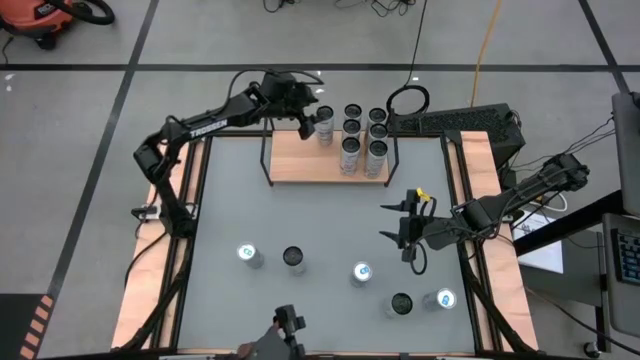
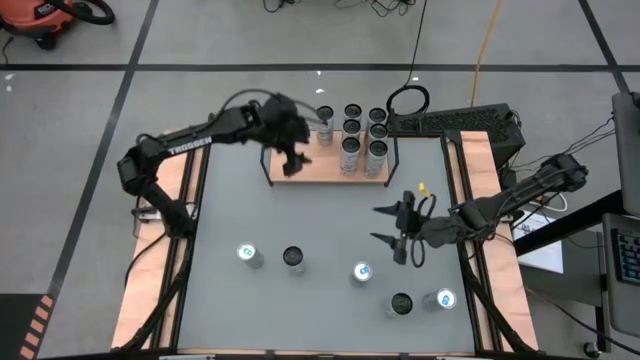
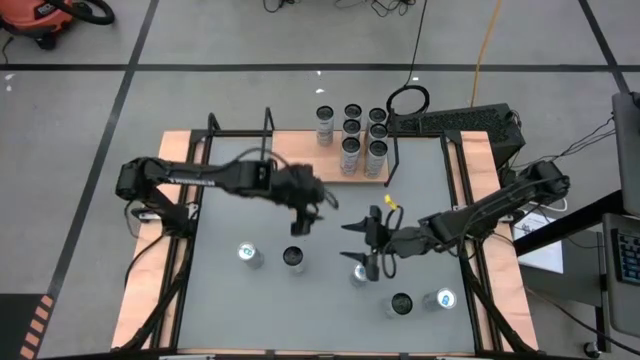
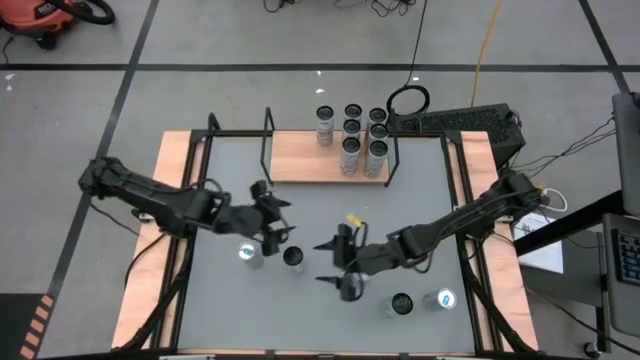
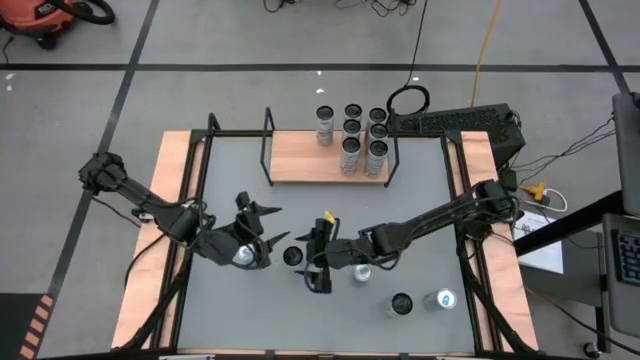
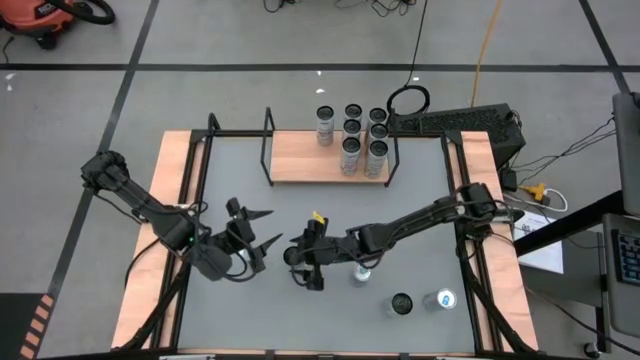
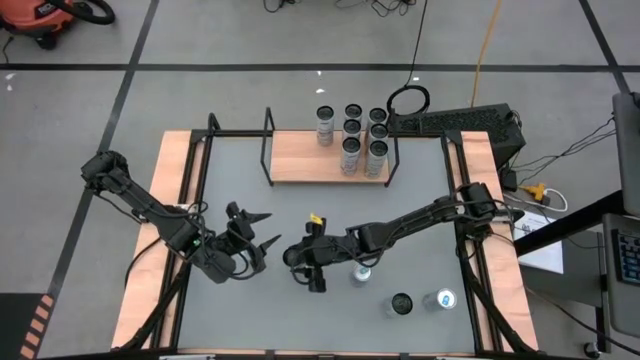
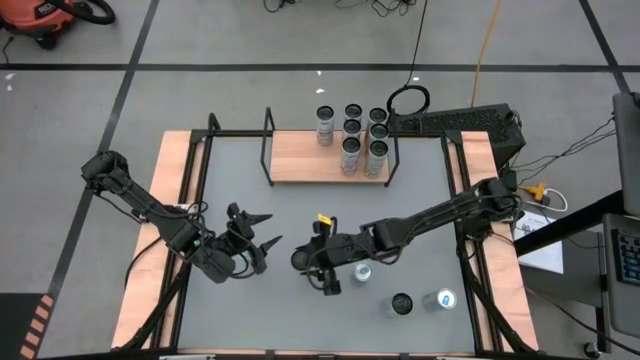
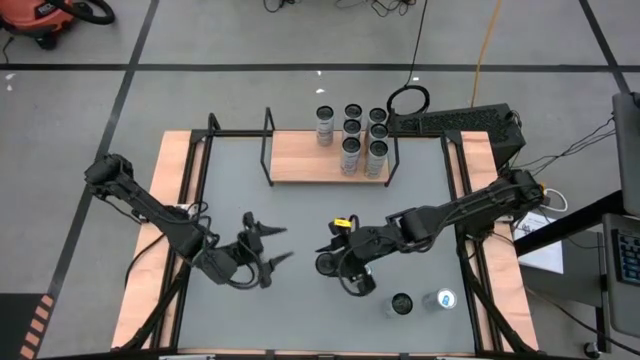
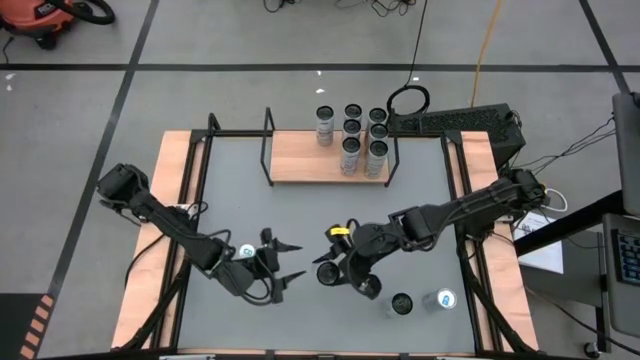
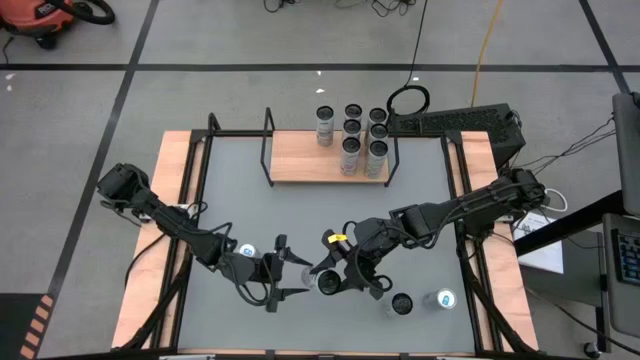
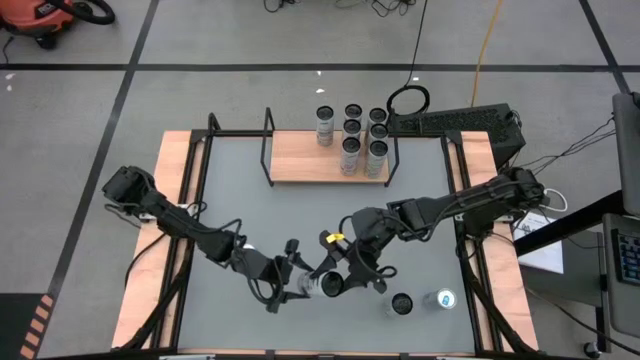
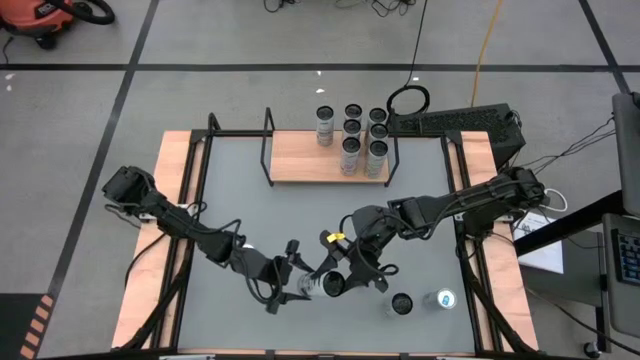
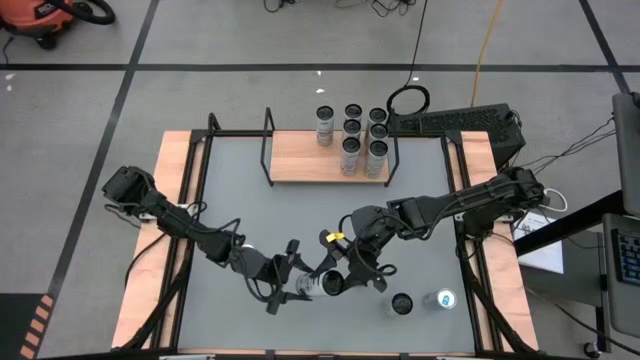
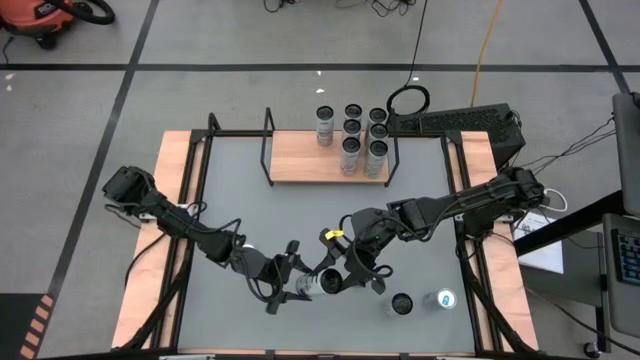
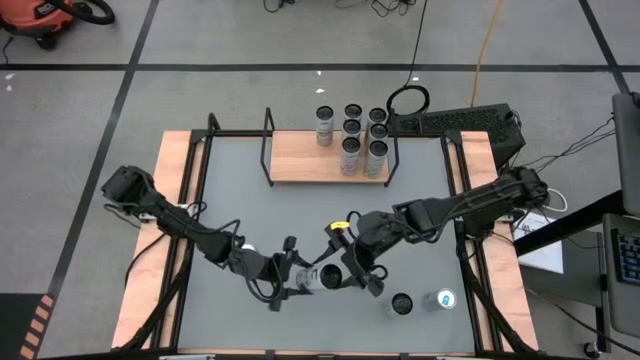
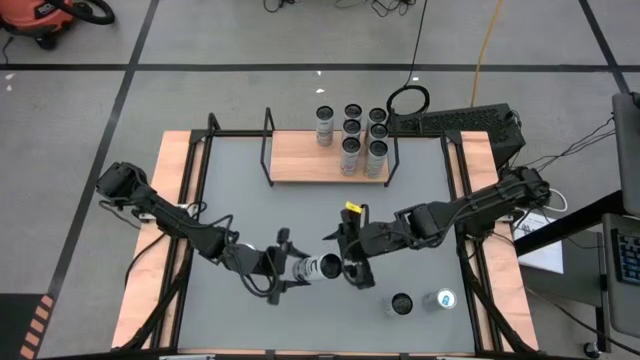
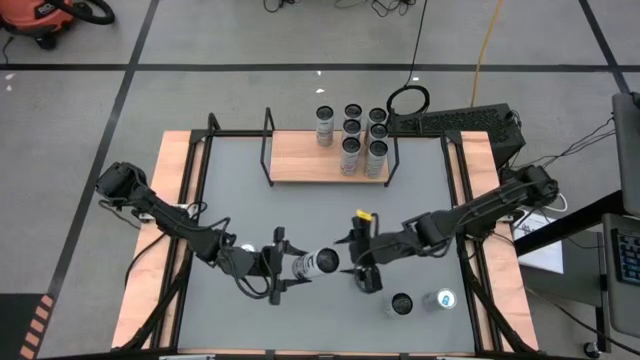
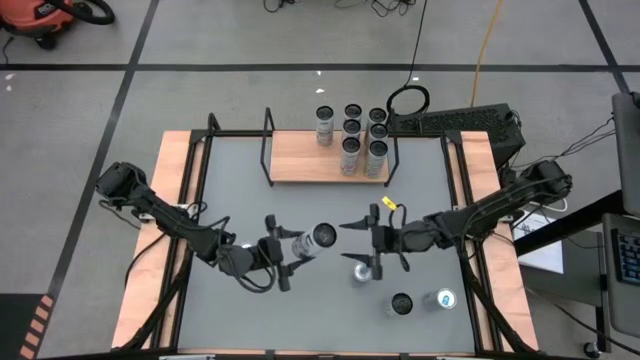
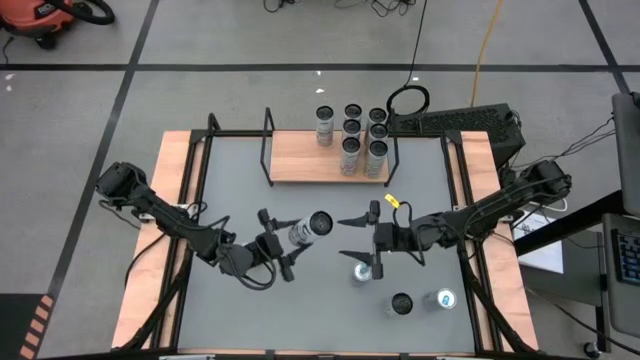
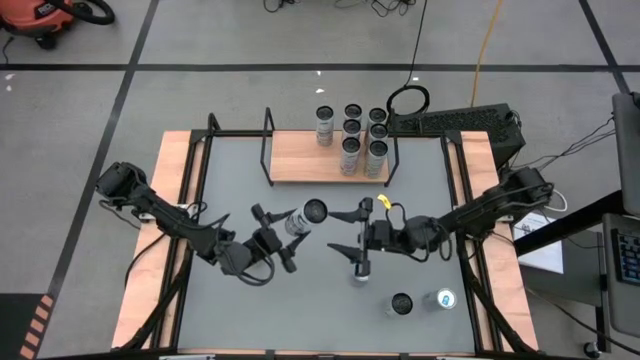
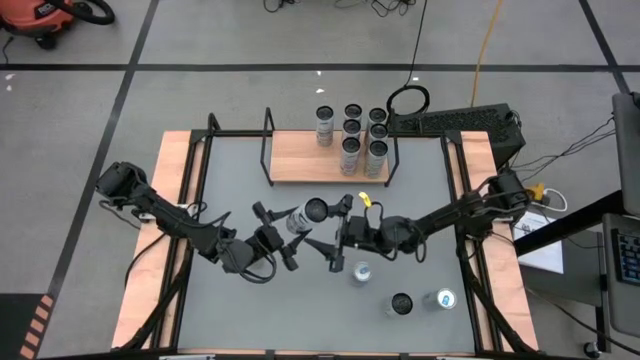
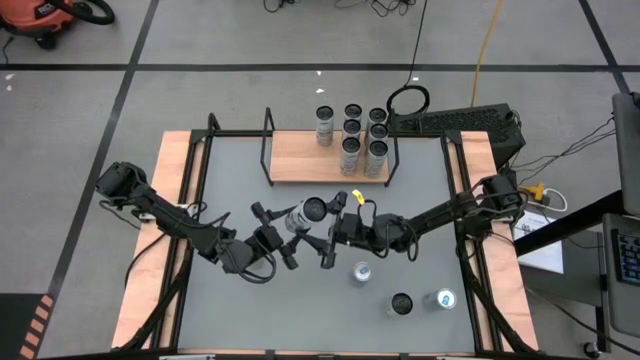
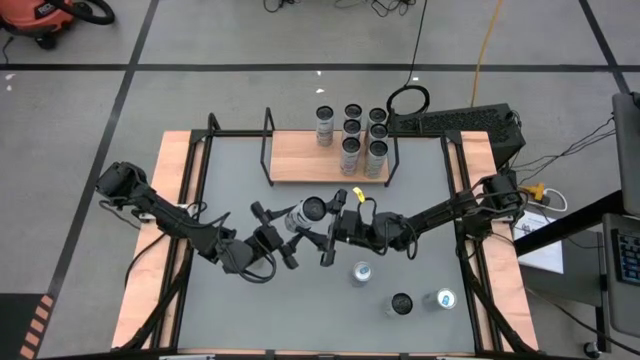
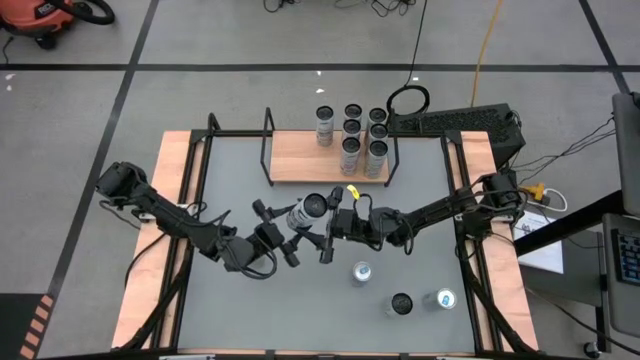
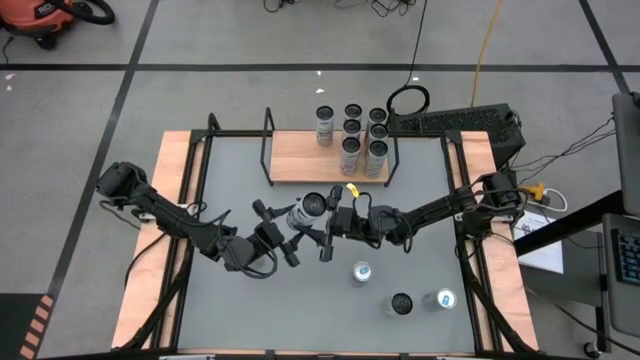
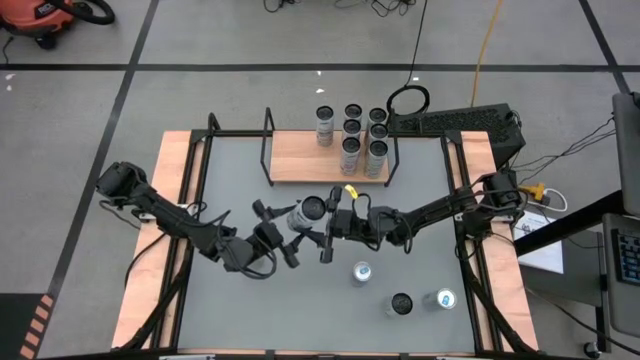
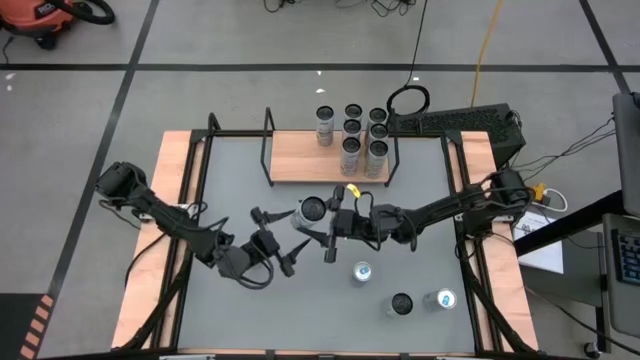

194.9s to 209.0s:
Task: Place canned beverage on shelf
Put the top white blue soda can on the shelf aligned with the white blue soda can

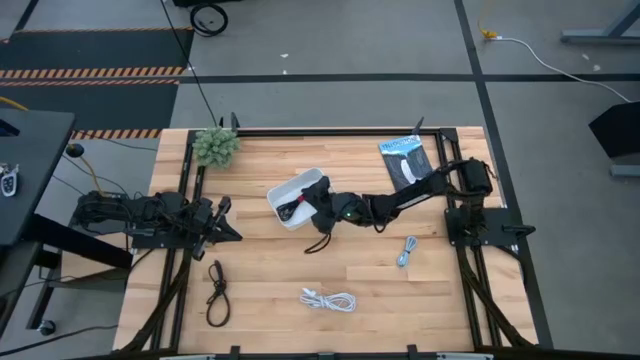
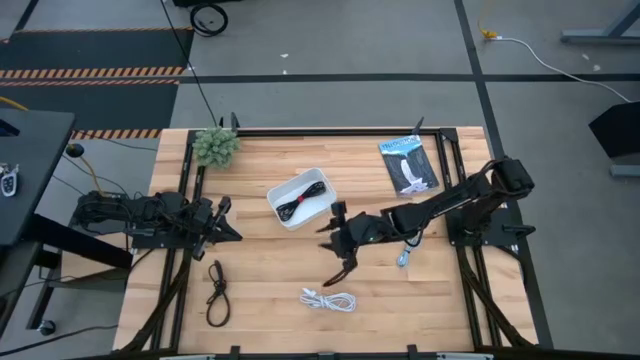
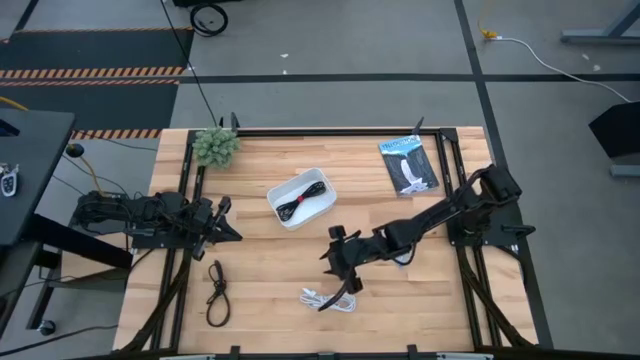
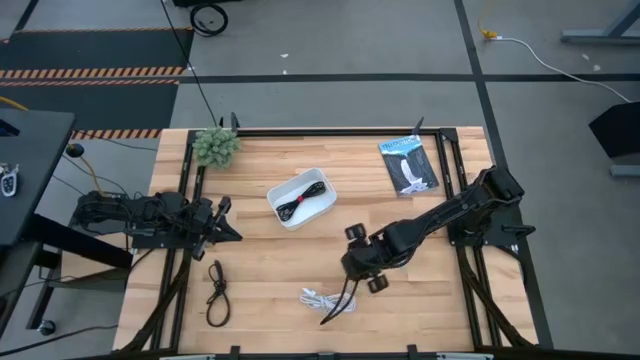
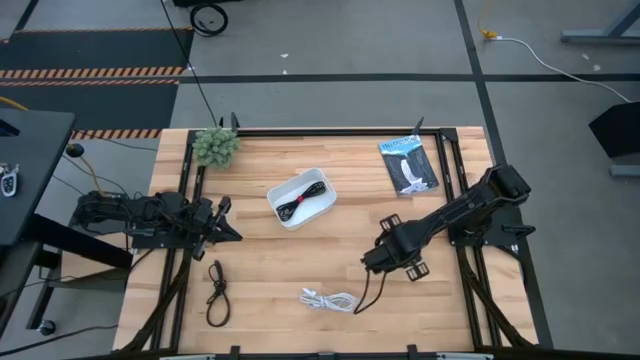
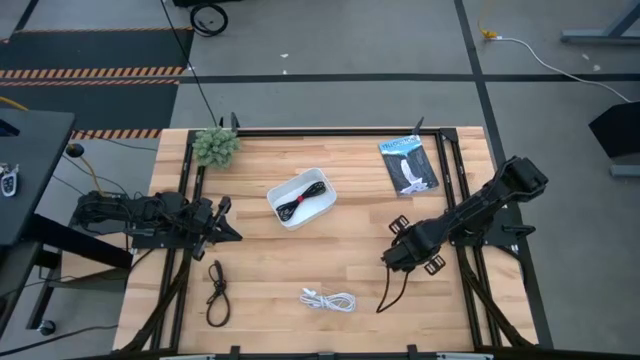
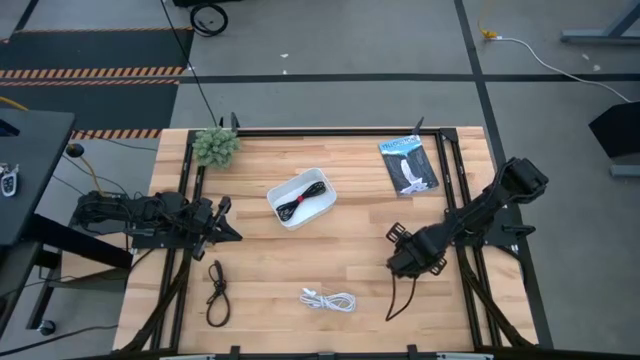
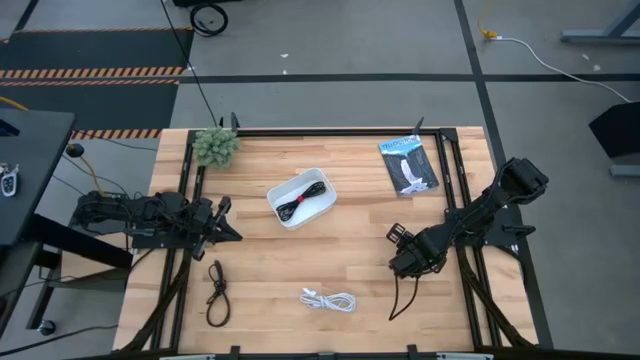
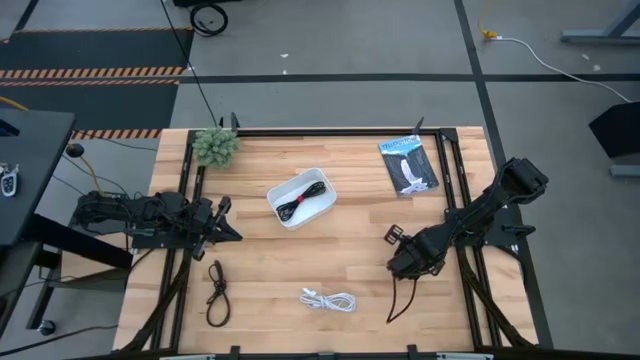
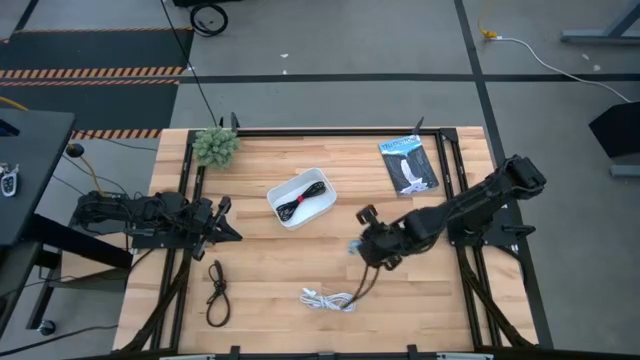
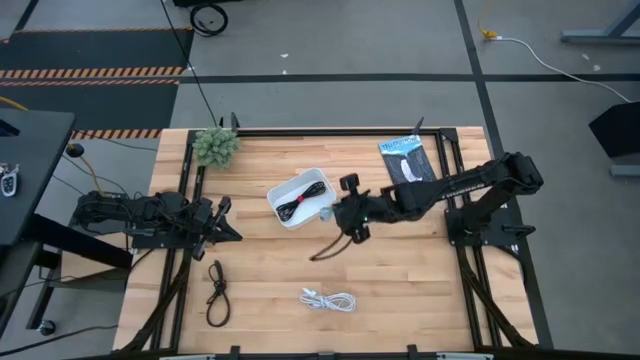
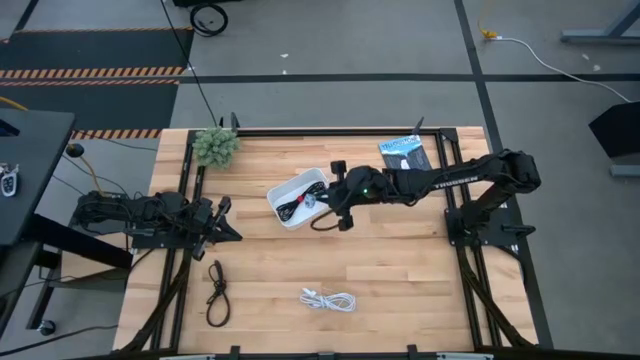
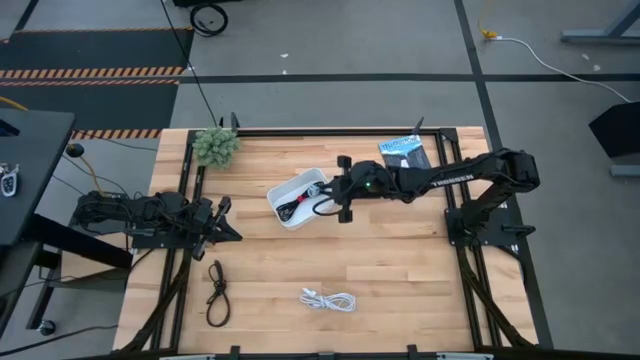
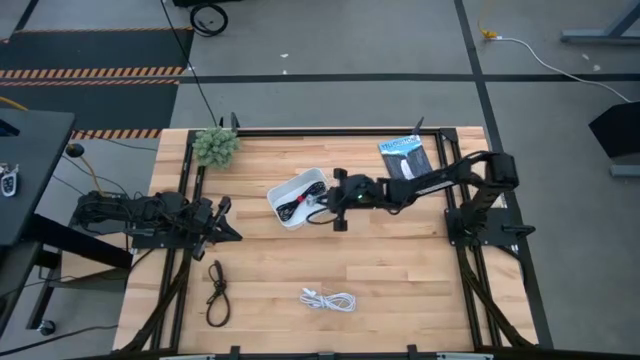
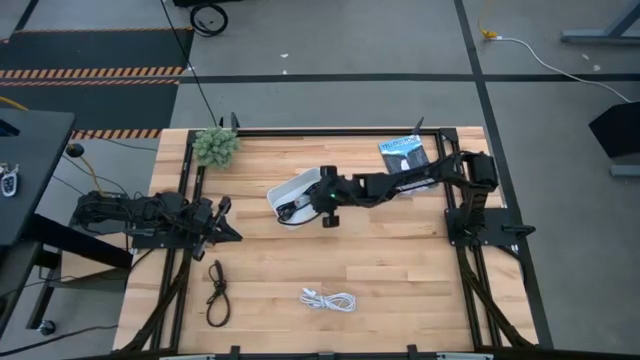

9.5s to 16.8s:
Task: Pick and place USB-C Cables
Put the blue cable charger into the white bin
